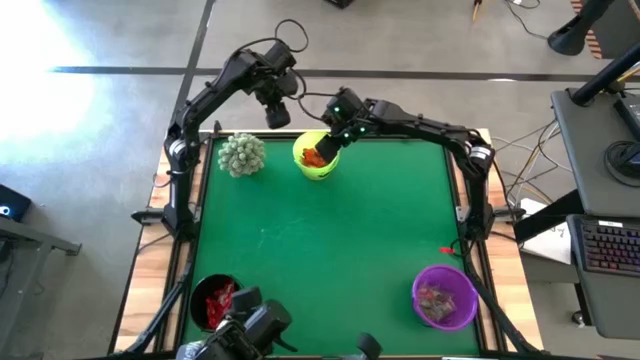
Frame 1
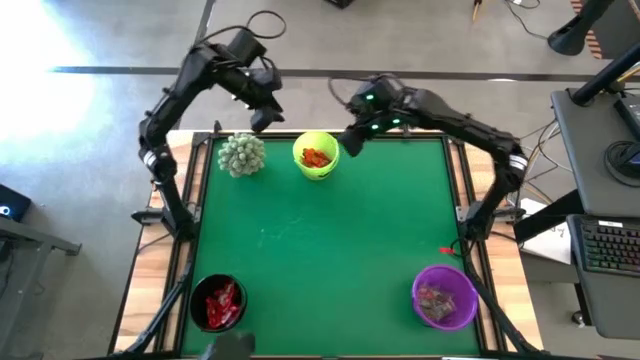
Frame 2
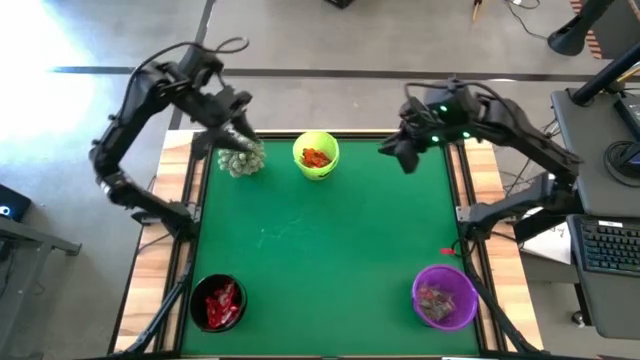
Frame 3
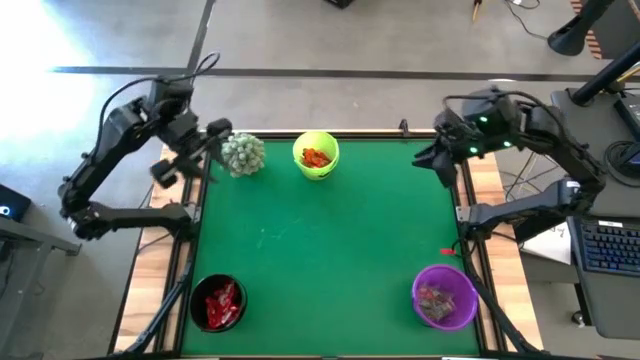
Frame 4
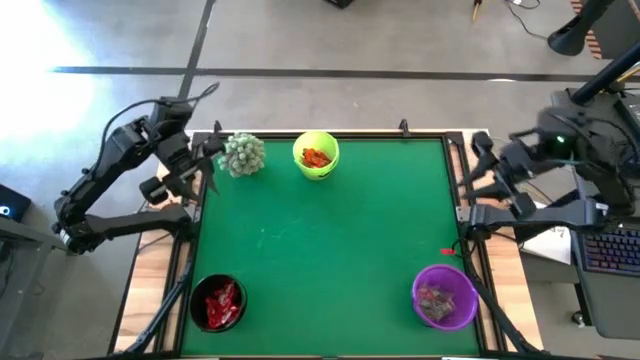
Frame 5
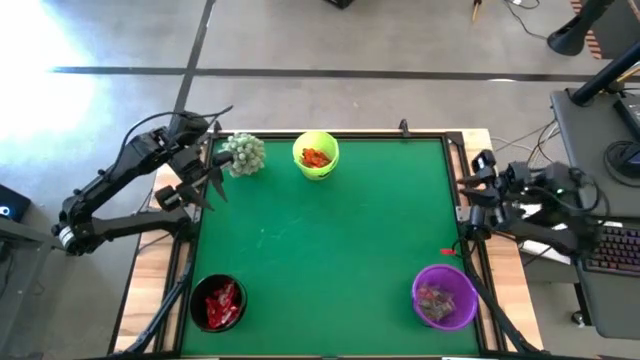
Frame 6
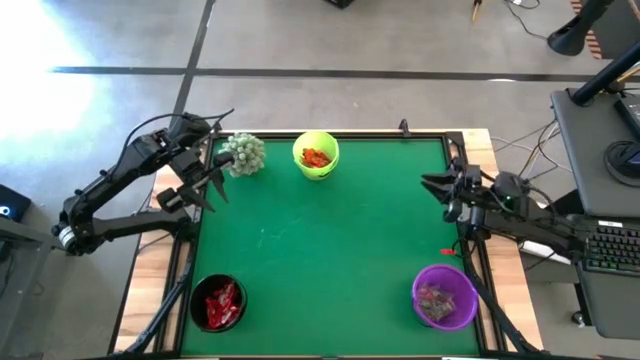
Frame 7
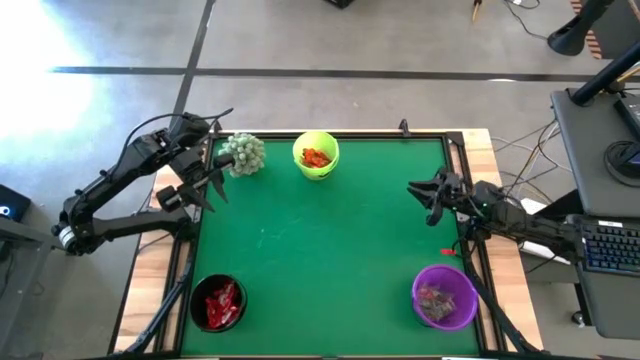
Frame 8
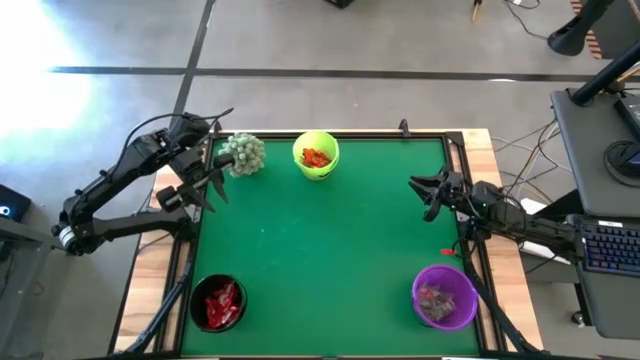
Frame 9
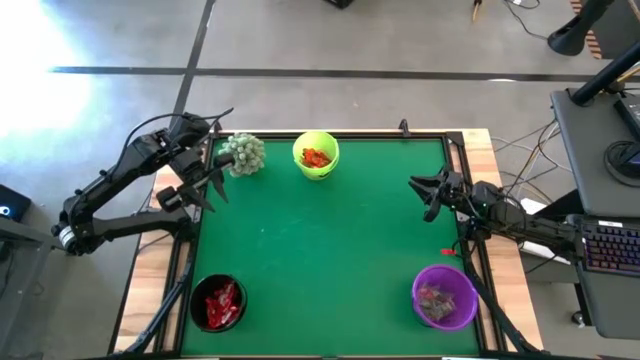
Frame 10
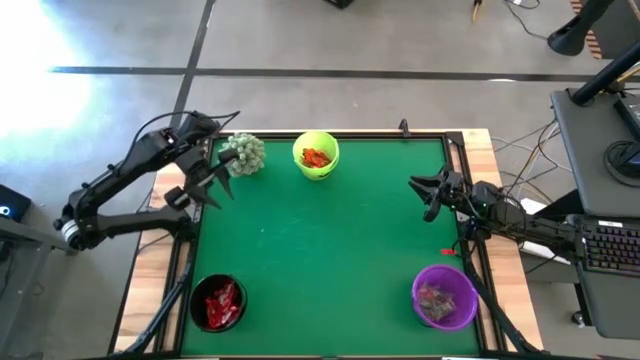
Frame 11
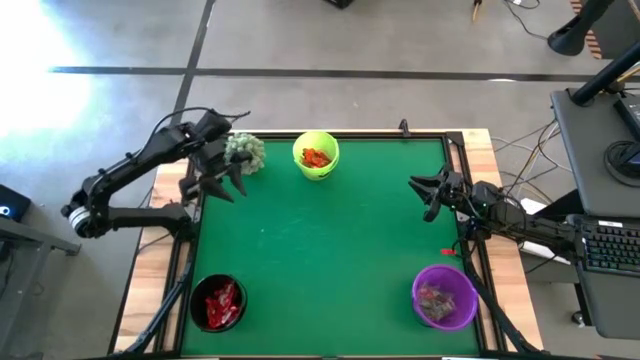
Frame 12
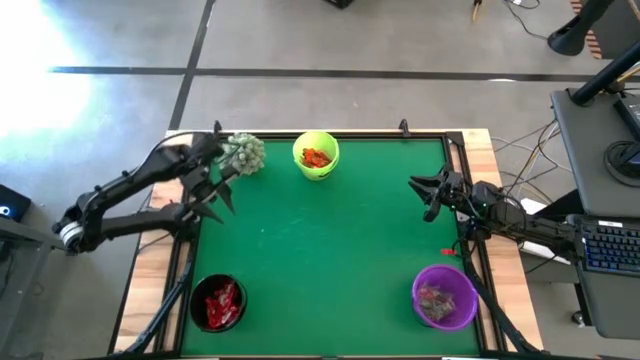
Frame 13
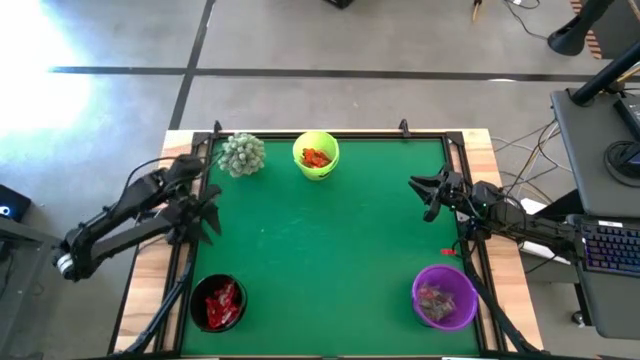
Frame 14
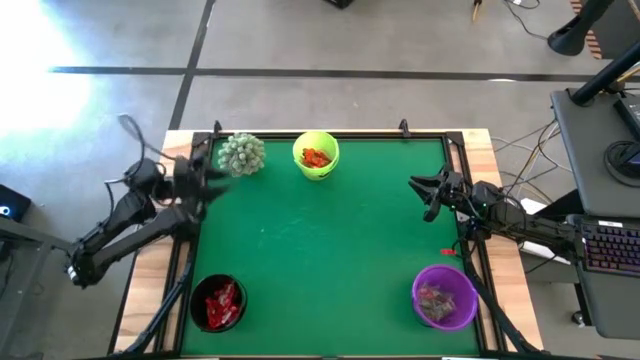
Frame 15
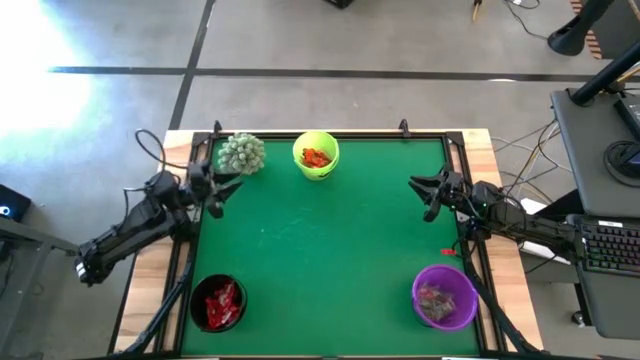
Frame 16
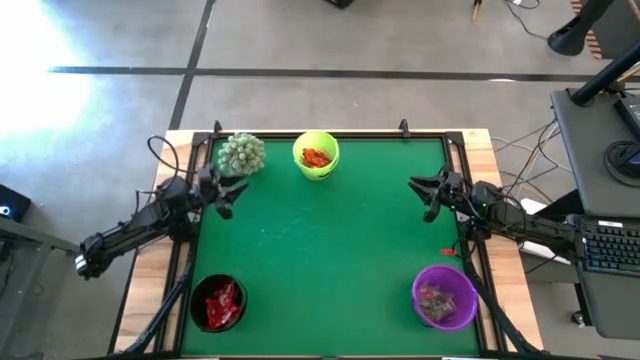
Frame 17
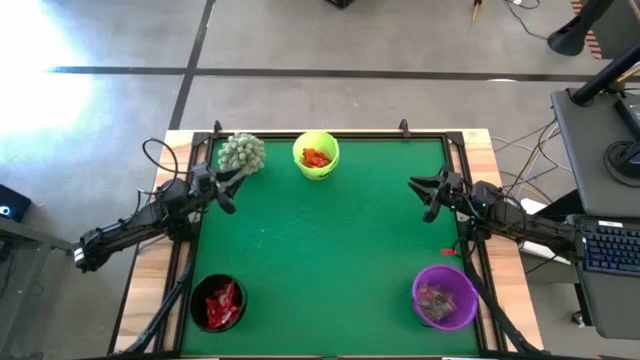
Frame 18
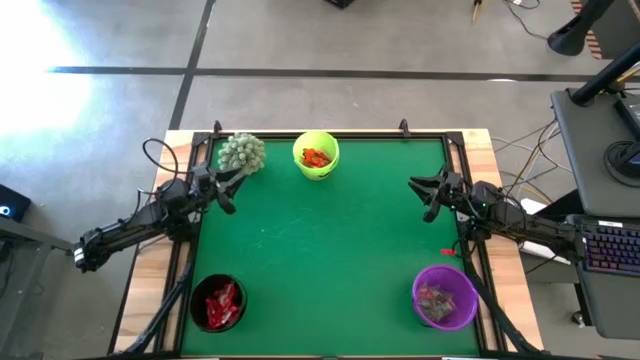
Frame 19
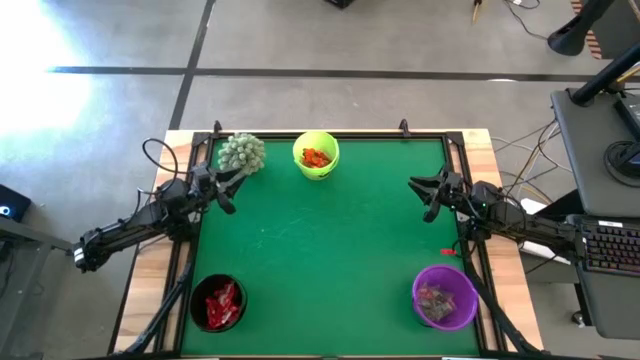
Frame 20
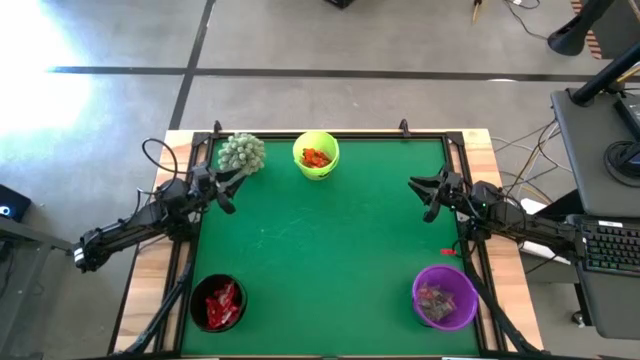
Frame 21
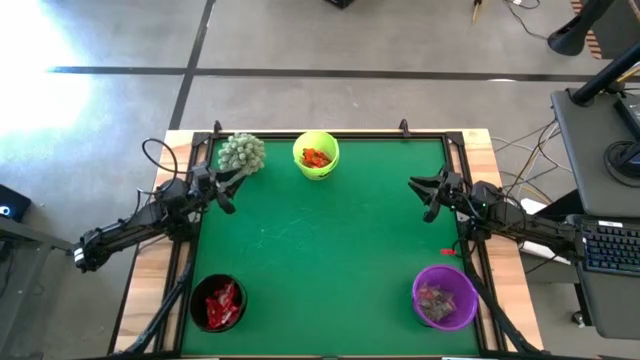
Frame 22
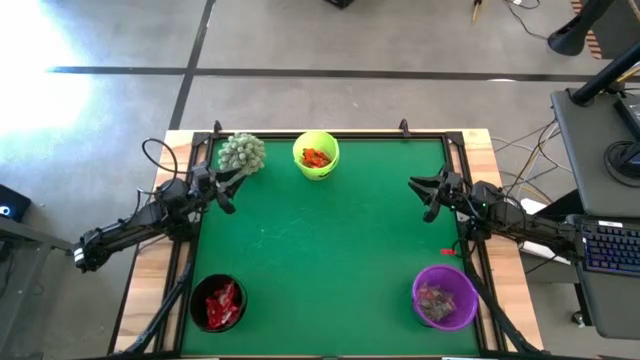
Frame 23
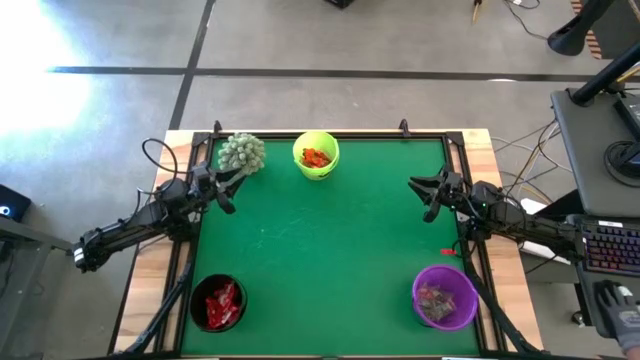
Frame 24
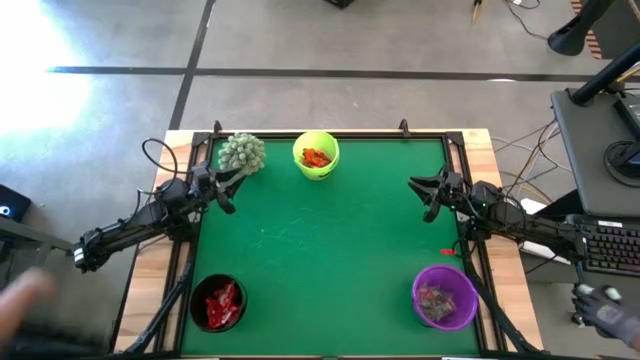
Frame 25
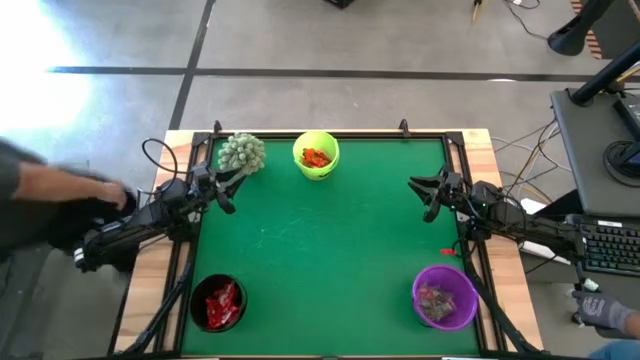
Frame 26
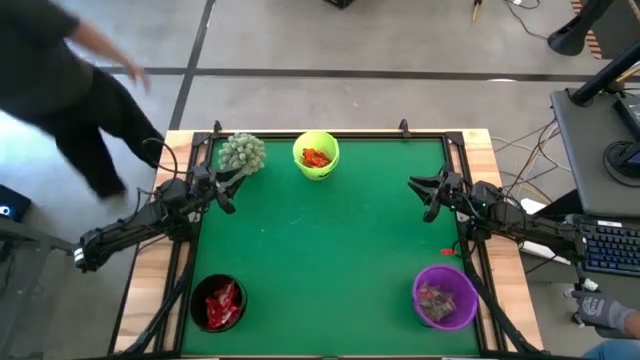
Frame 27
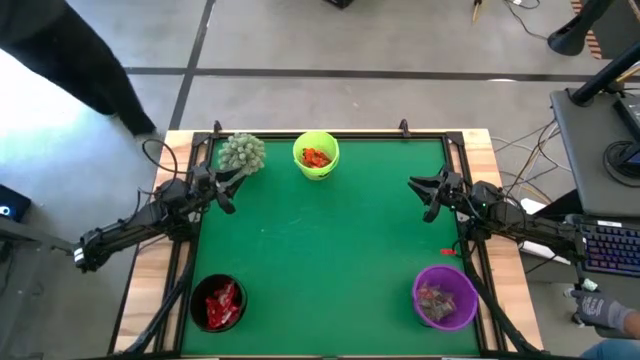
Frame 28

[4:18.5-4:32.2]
Task: Organize candy in baskets
Return to Home Position

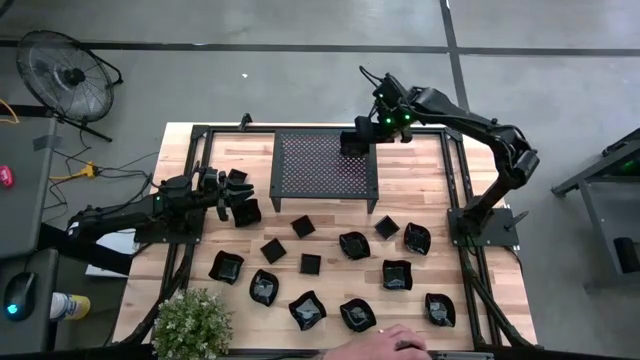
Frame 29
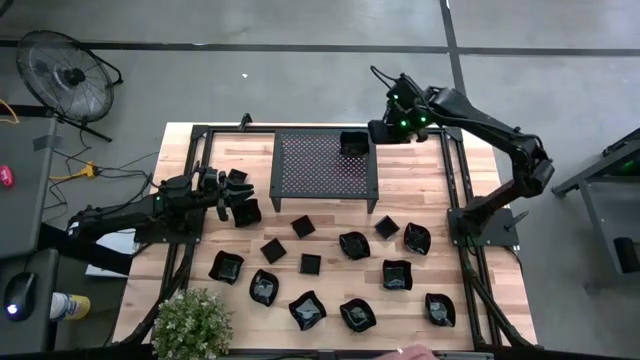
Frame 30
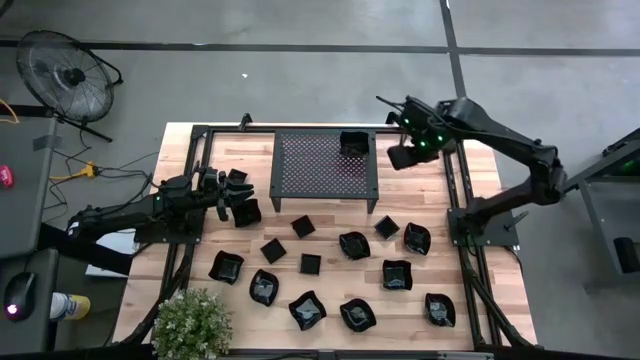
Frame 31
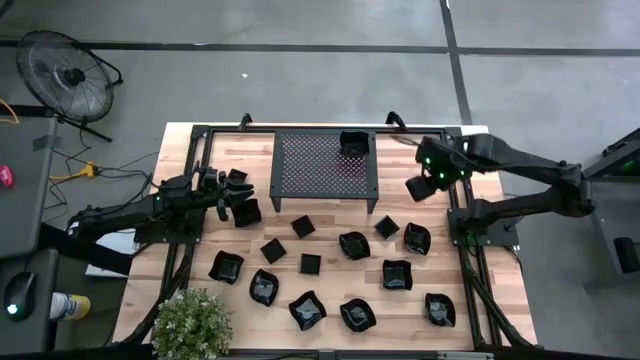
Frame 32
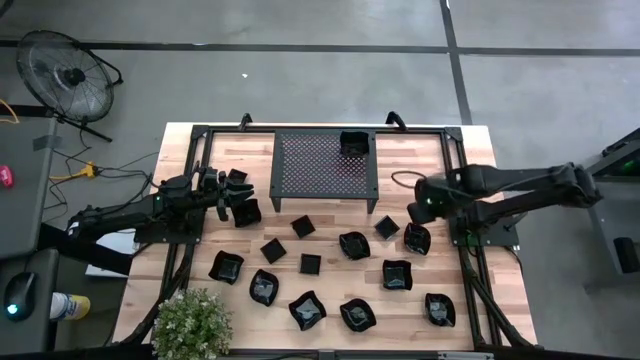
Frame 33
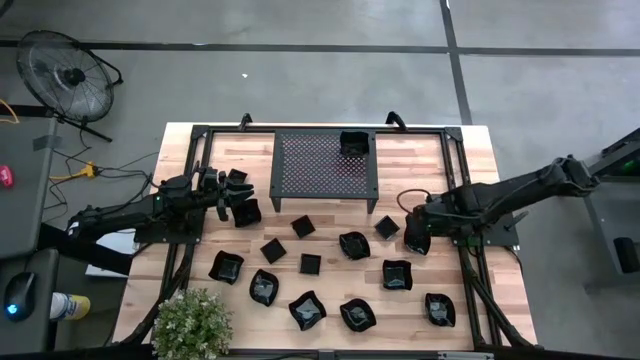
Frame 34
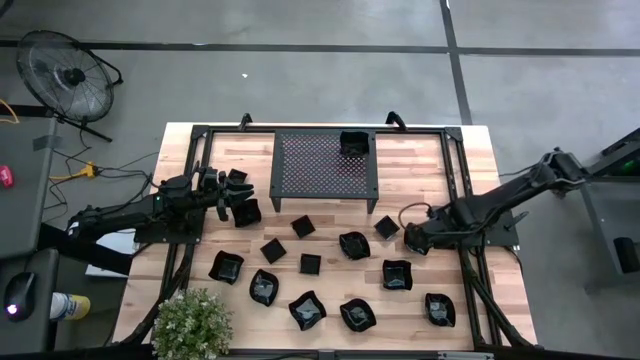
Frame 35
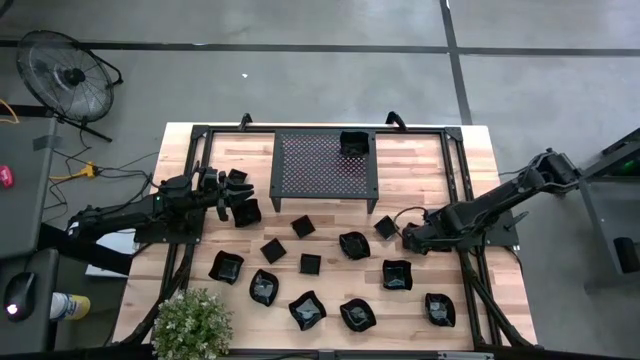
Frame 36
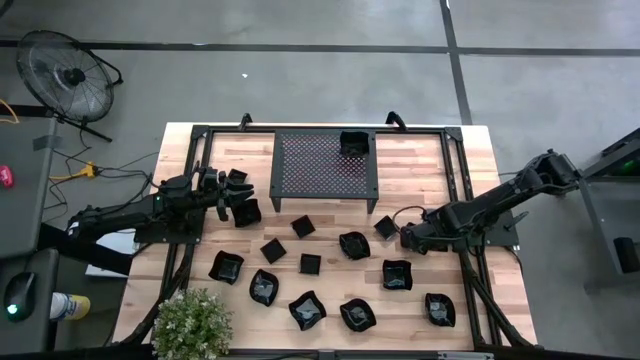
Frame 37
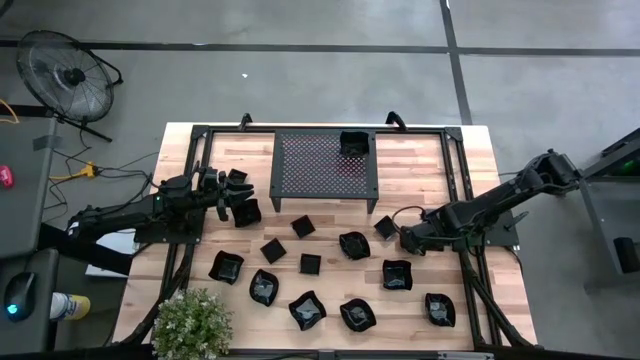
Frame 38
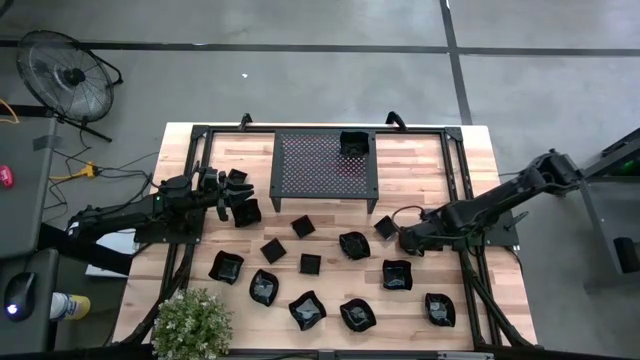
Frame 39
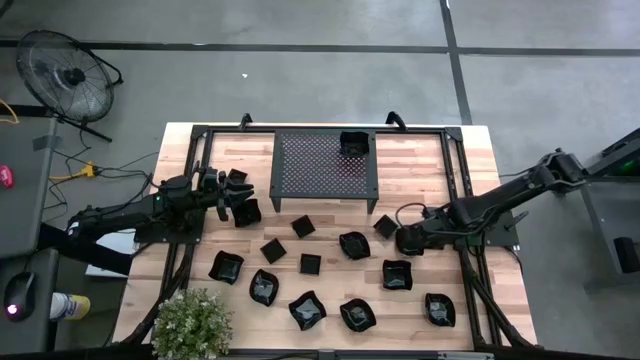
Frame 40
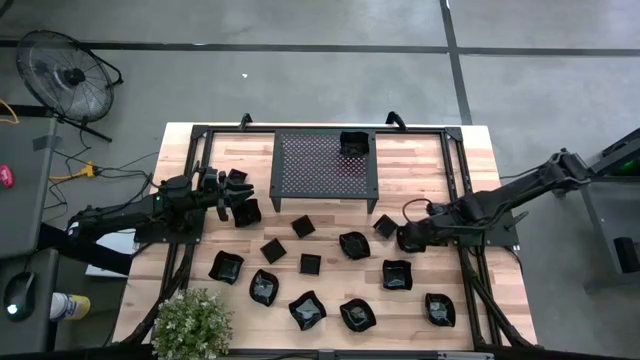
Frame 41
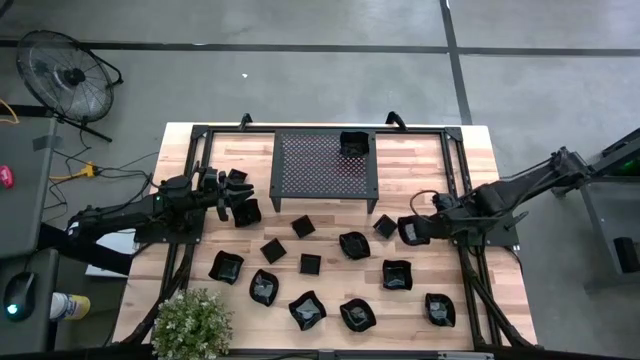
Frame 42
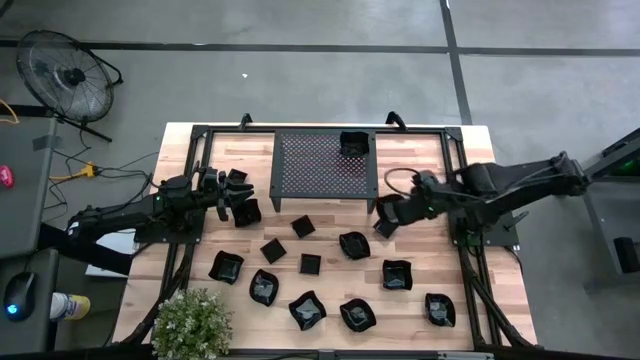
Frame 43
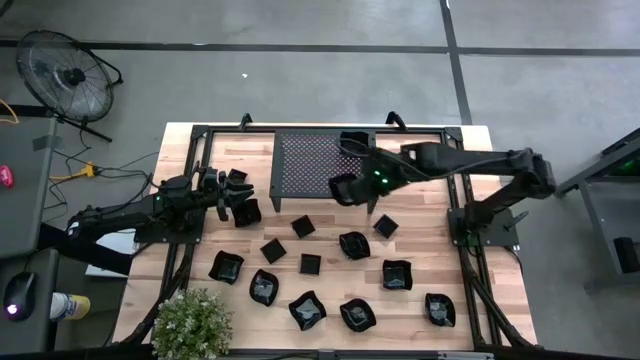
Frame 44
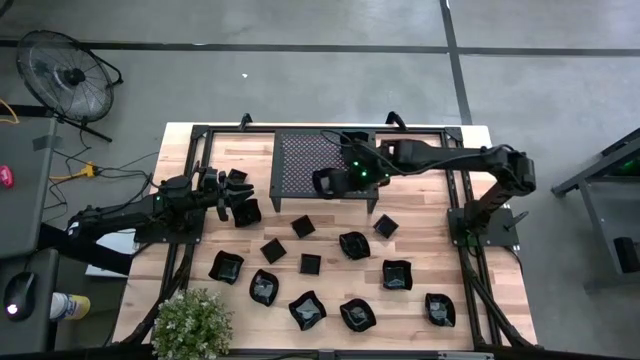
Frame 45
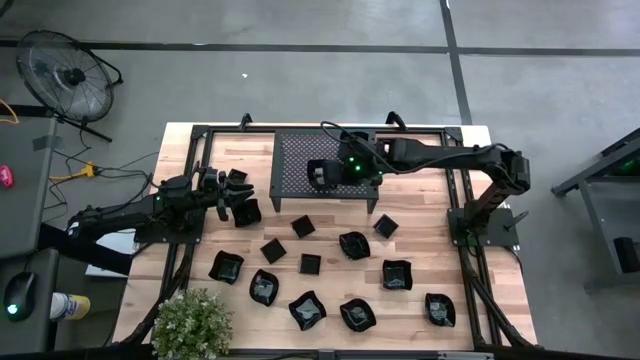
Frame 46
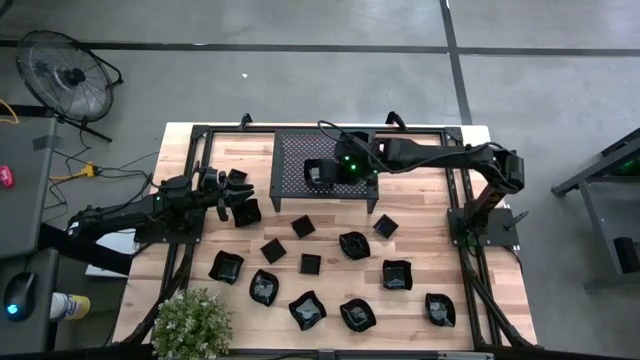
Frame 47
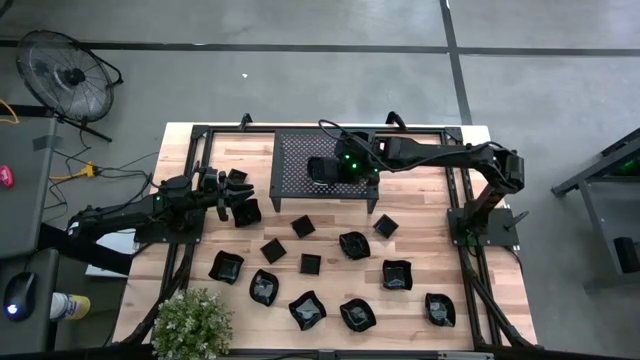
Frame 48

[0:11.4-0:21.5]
Task: Pick & Place Mini shaped plates
Put the black leaf-shaped plate on the shelf
